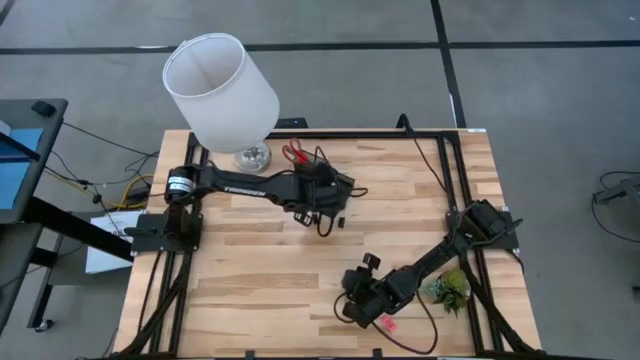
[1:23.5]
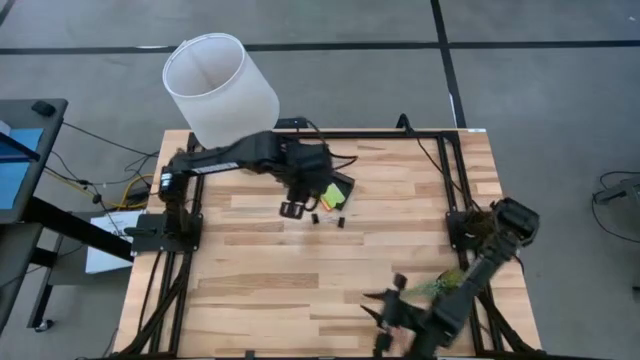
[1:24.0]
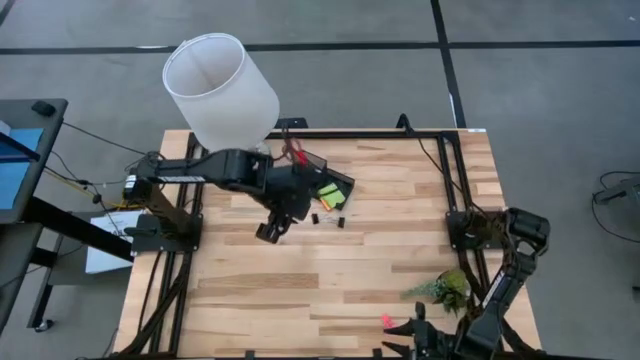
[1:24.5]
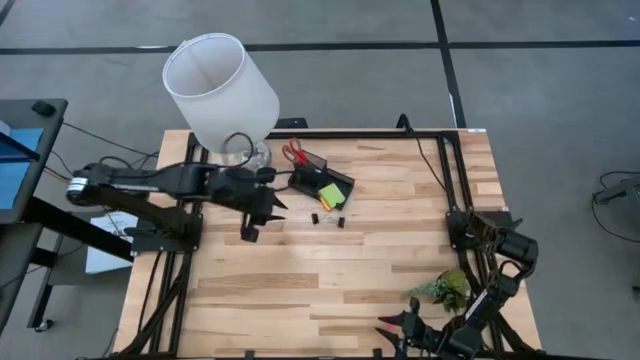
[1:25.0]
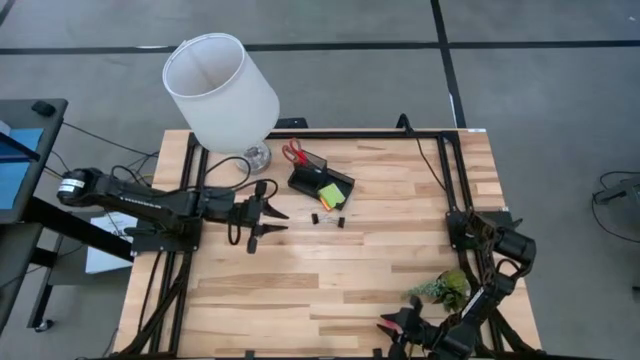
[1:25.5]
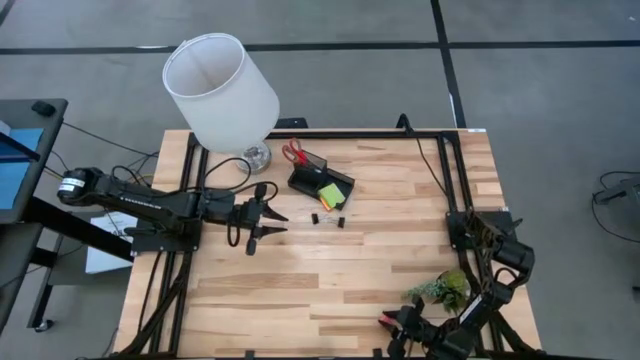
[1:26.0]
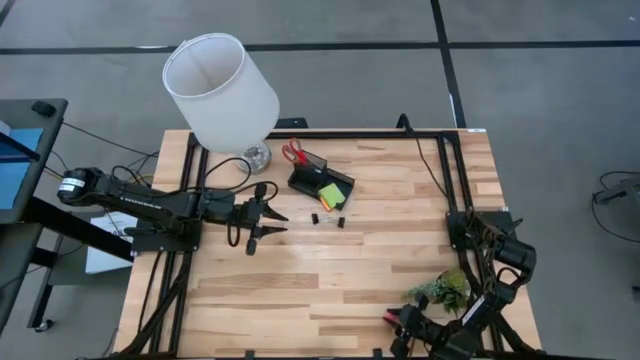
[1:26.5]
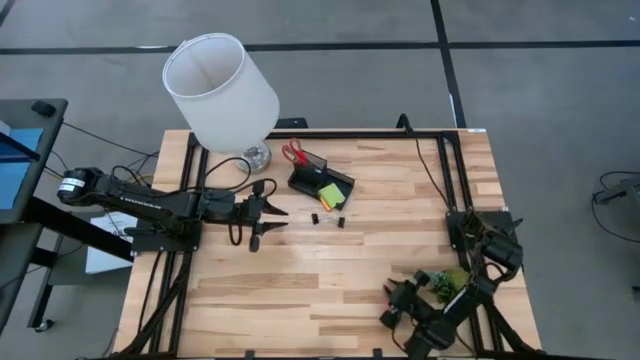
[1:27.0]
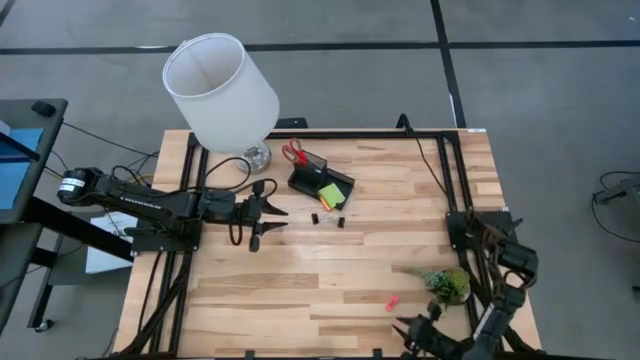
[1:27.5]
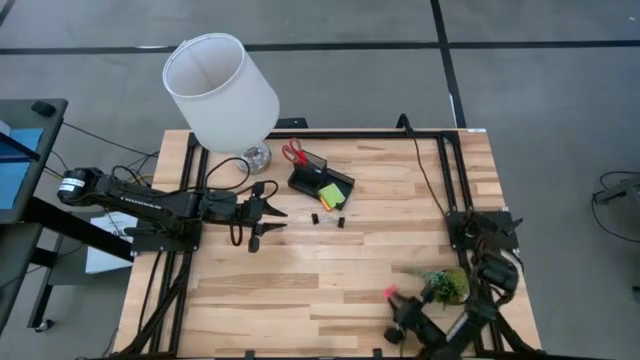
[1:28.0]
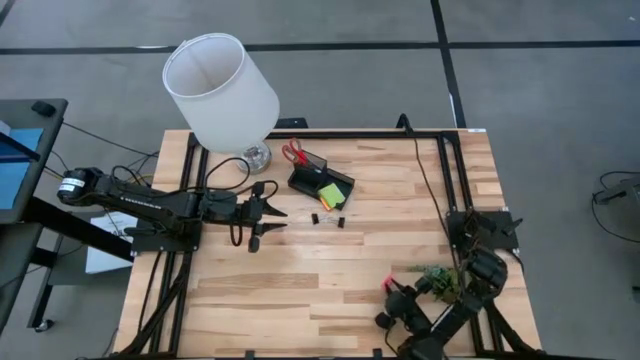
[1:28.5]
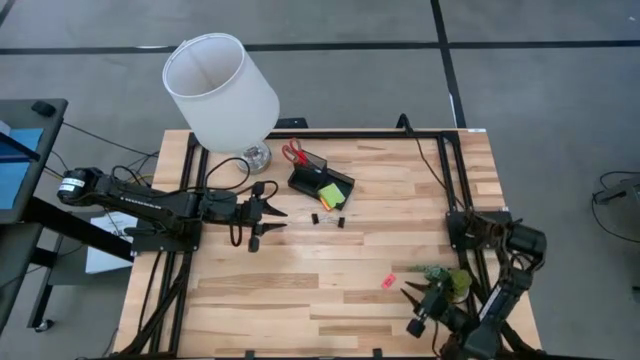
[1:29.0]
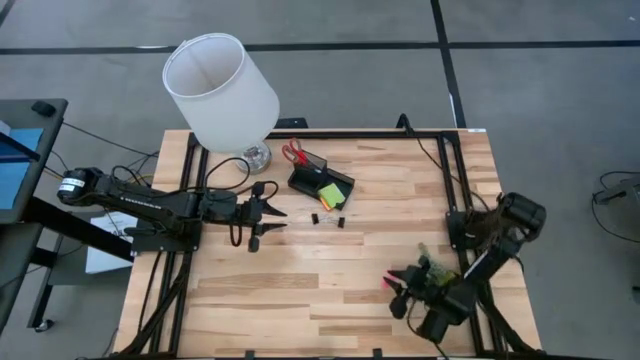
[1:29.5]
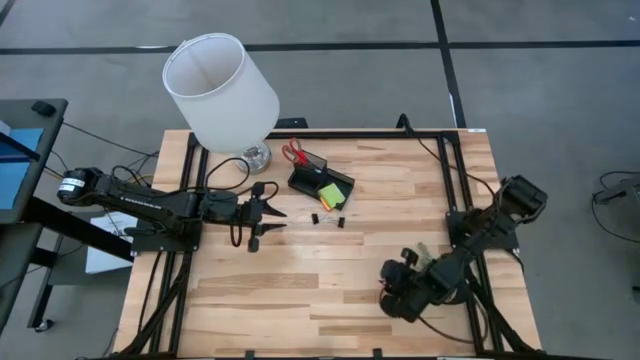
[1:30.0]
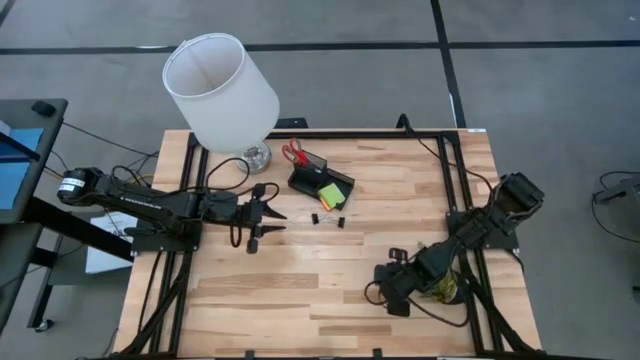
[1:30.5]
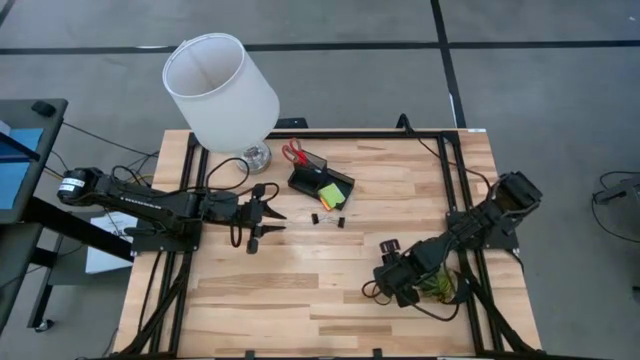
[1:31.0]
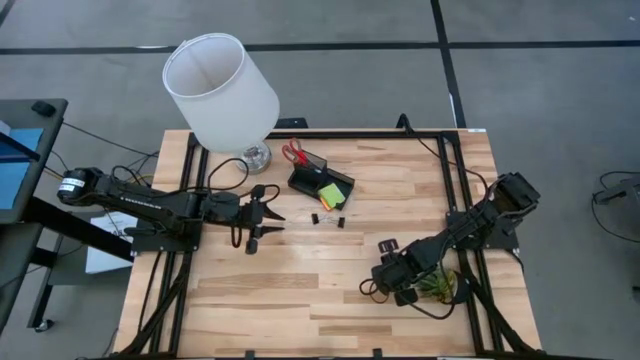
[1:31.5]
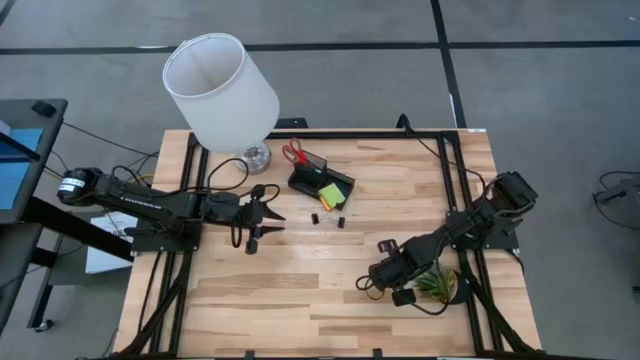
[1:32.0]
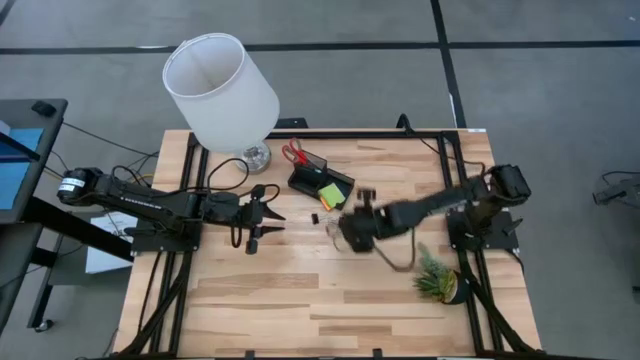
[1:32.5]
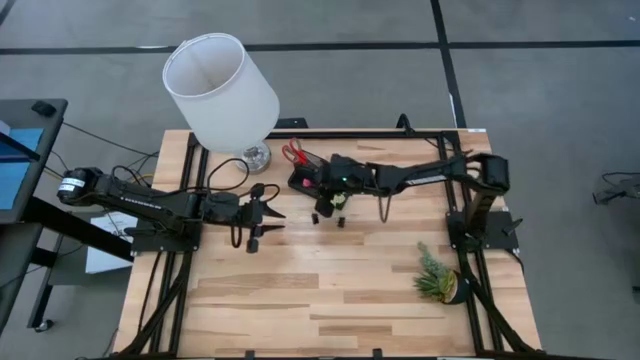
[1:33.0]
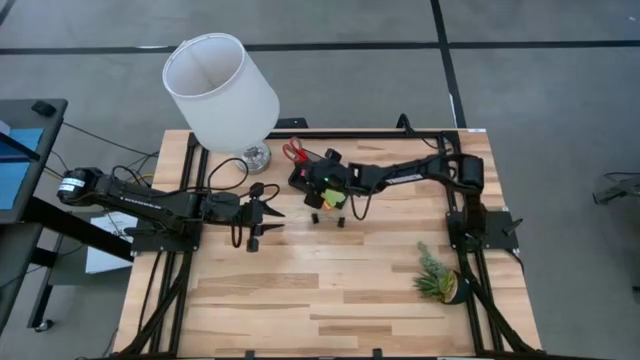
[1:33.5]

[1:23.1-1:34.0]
Task: Pick and place office supplies into organizer
Put the pink eraser into the black desk organizer

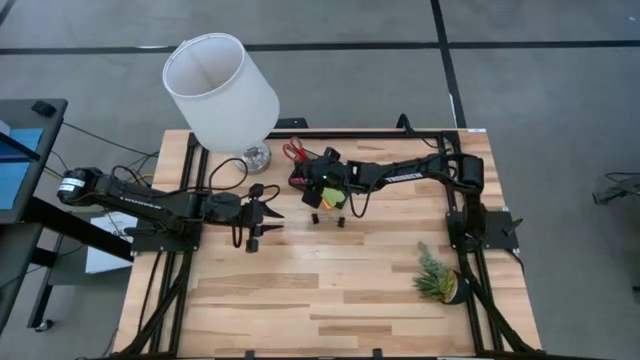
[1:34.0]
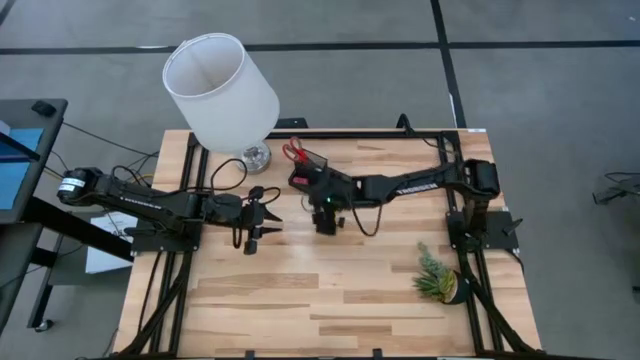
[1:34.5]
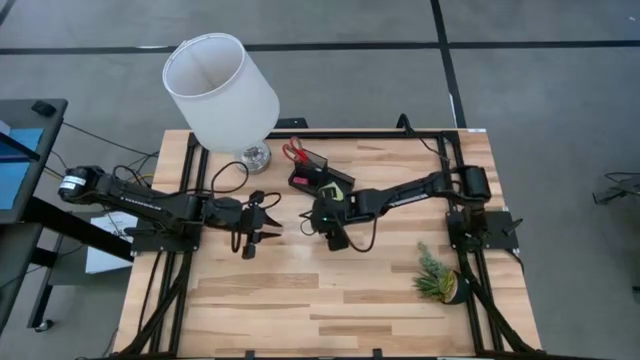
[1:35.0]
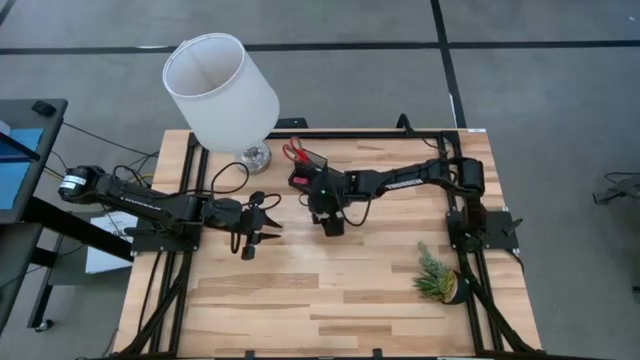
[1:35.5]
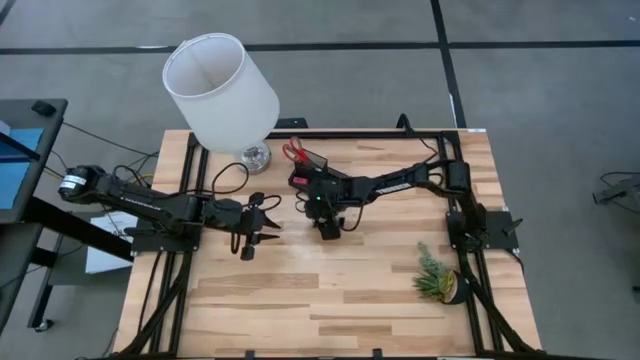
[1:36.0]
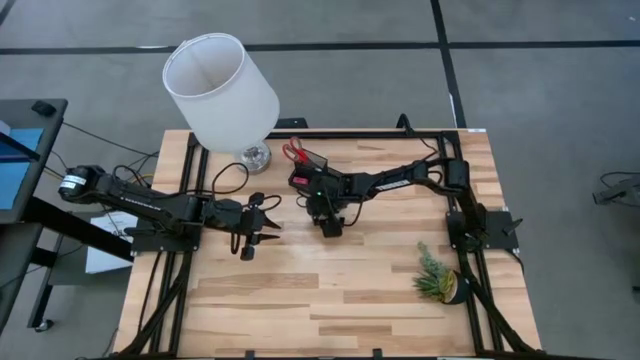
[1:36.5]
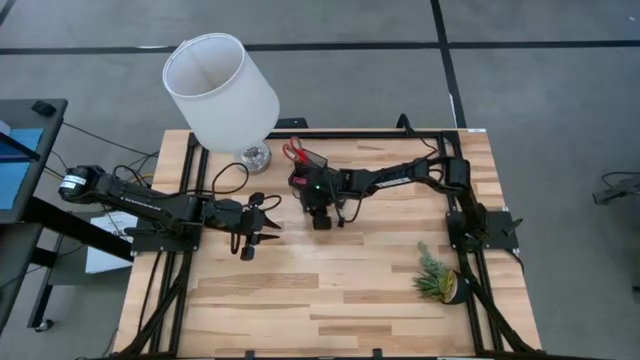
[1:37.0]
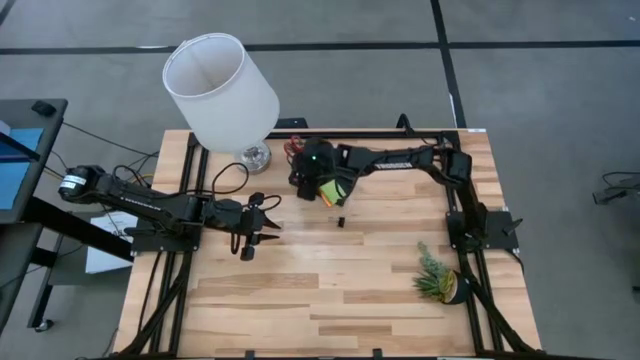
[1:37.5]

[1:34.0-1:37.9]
Put the left black binder clip into the black desk organizer

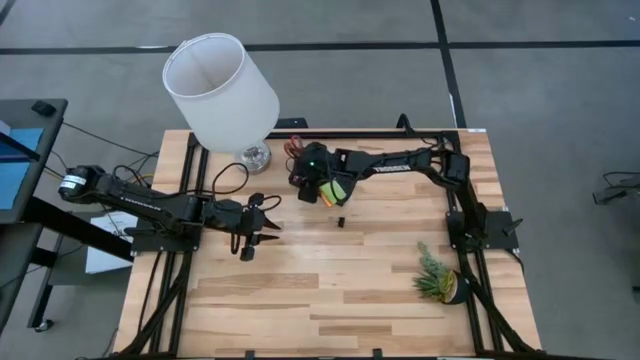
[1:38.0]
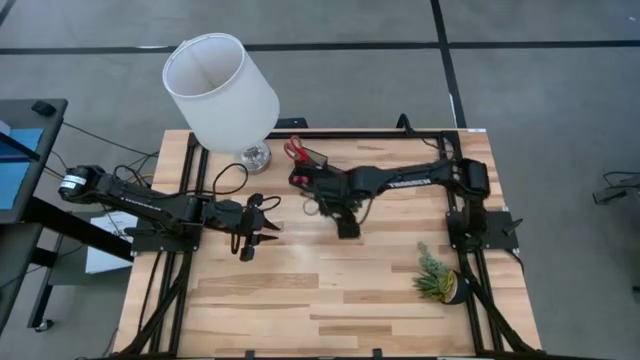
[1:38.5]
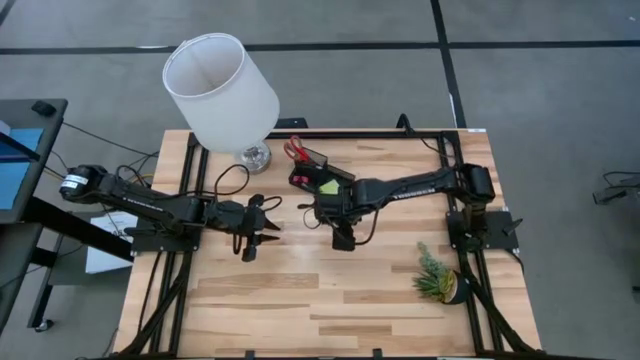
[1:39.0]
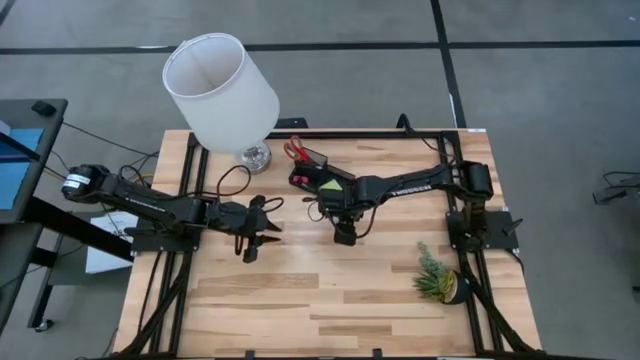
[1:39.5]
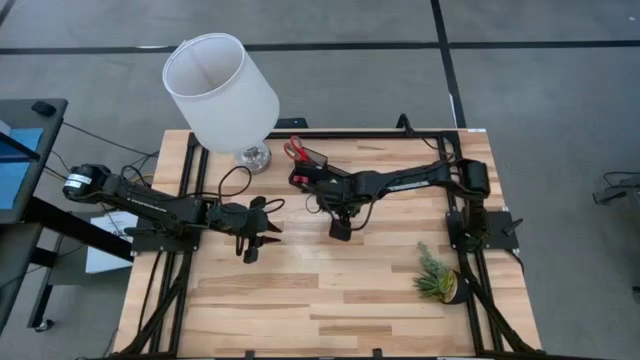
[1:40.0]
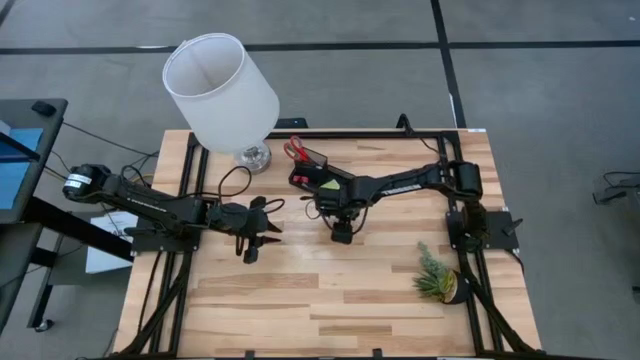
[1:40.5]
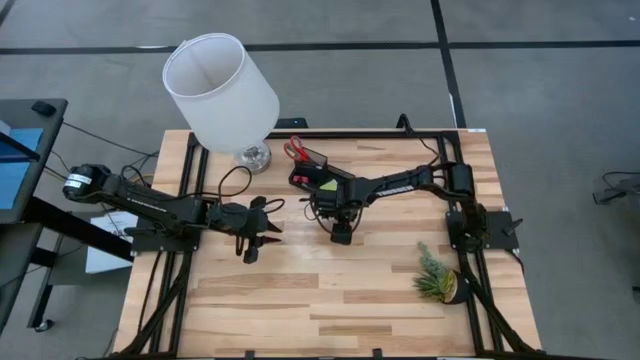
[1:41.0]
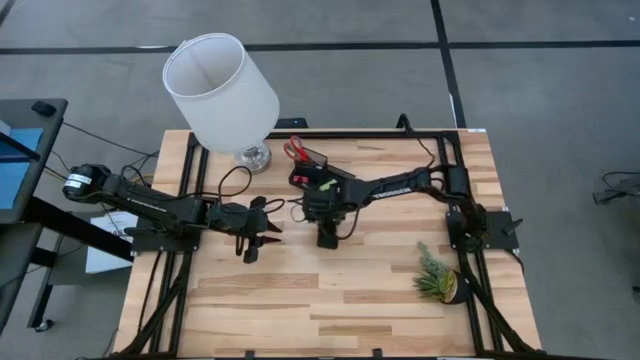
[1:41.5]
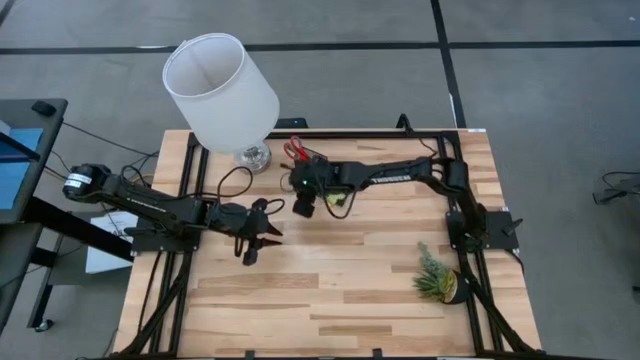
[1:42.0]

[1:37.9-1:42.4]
Put the black binder clip into the black desk organizer

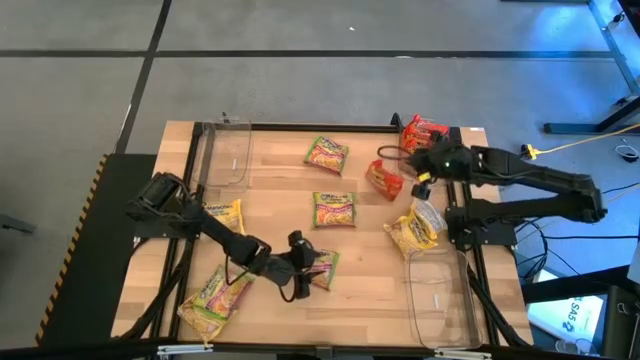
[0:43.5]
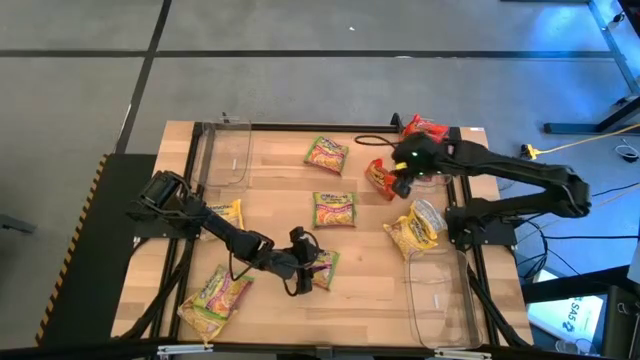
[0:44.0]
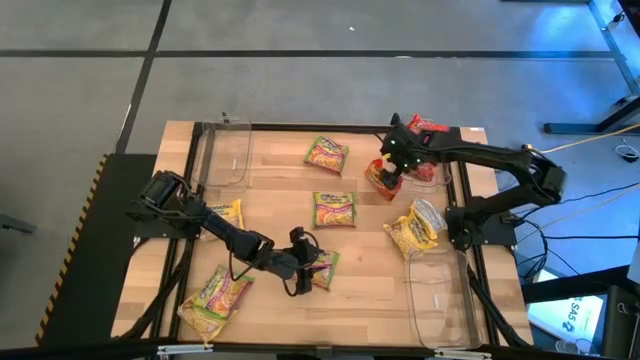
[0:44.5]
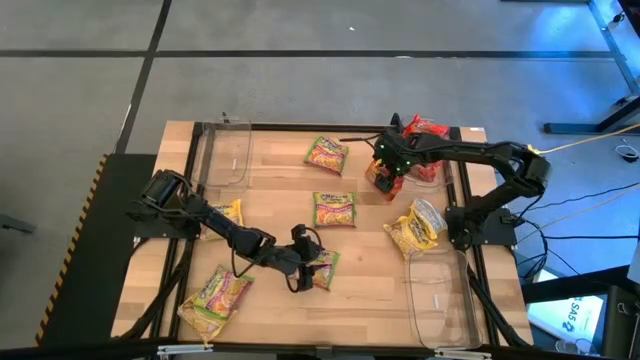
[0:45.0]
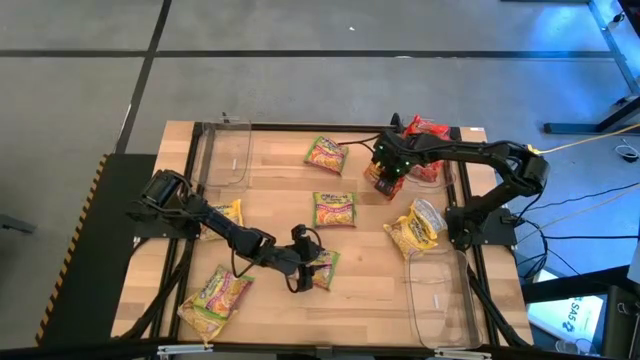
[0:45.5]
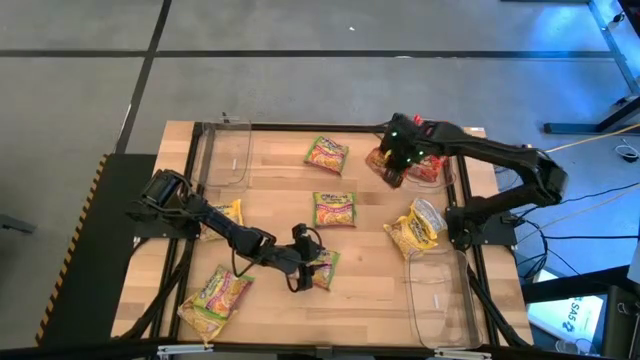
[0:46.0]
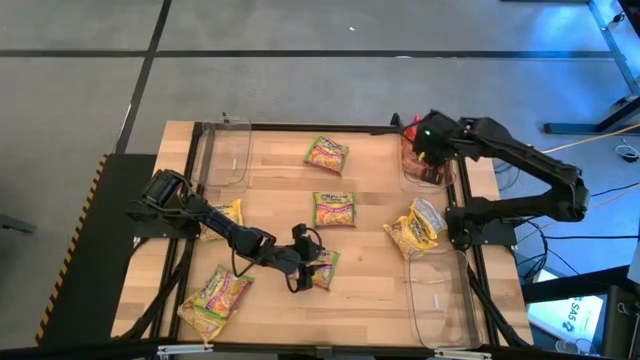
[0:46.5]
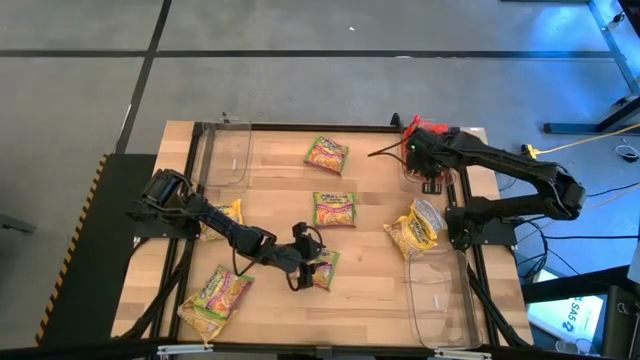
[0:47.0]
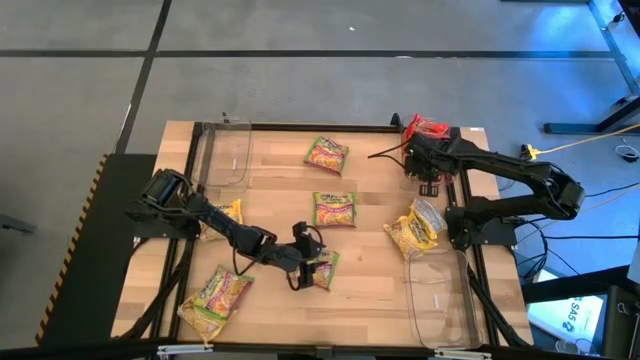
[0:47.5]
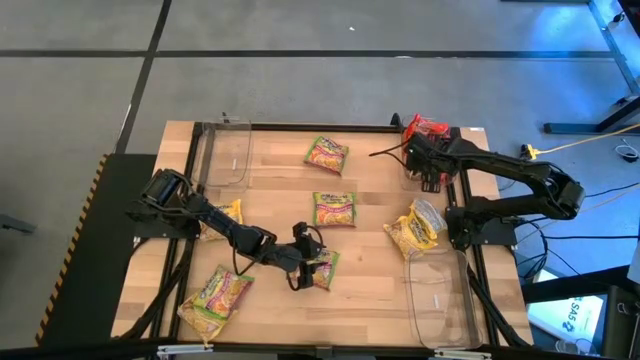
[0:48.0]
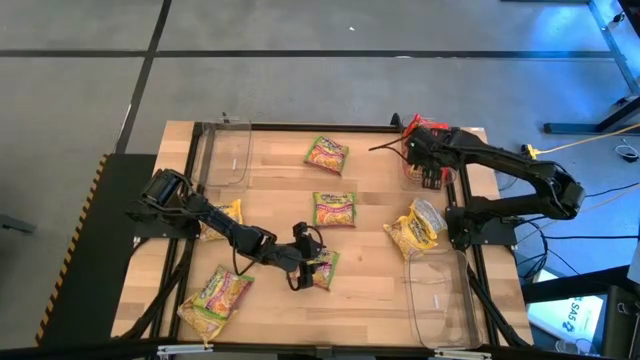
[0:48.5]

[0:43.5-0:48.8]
Task: Sort Maruchan noodles
Put the orange noodle pack into the top right transparent bin
